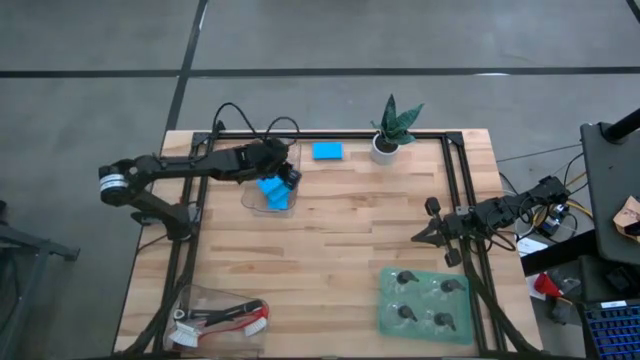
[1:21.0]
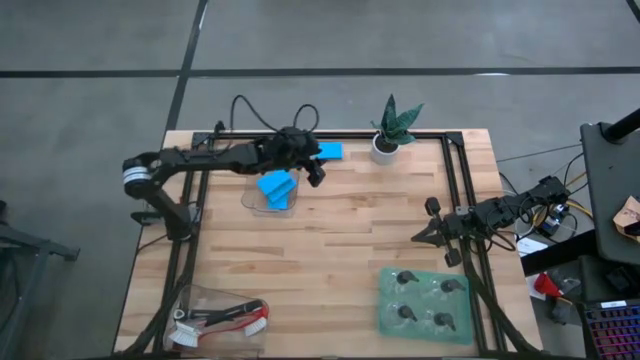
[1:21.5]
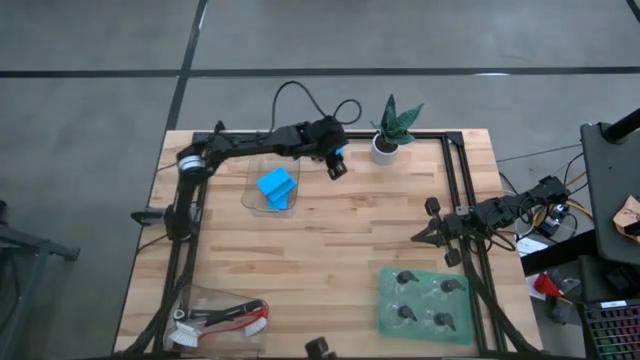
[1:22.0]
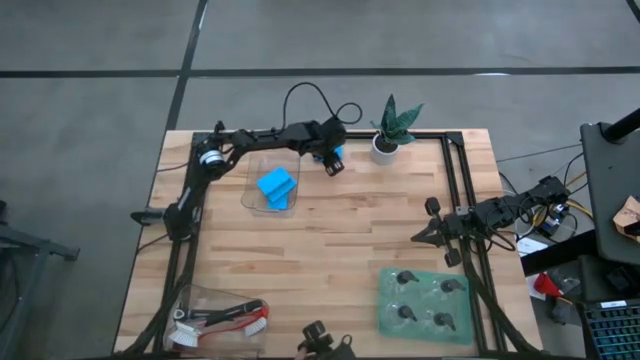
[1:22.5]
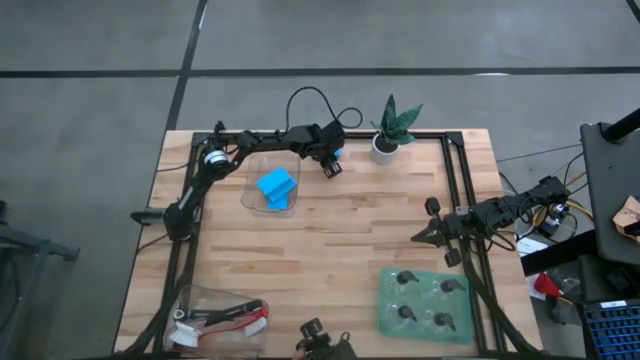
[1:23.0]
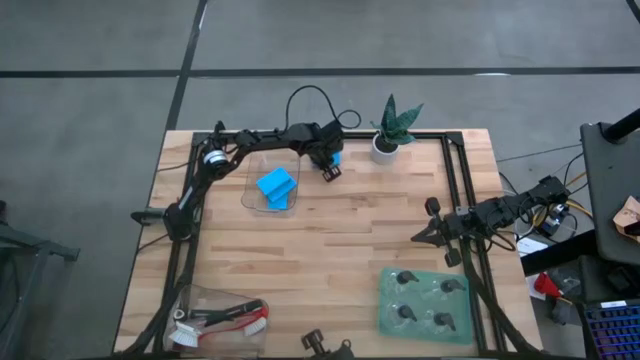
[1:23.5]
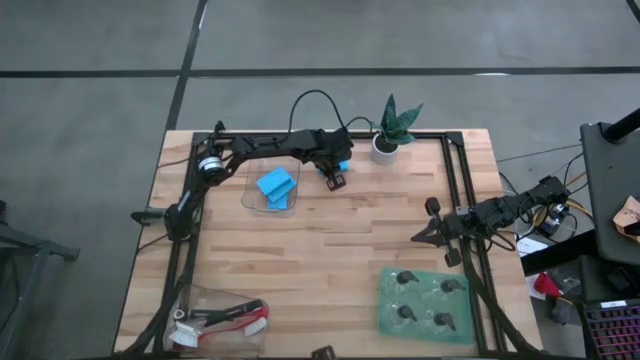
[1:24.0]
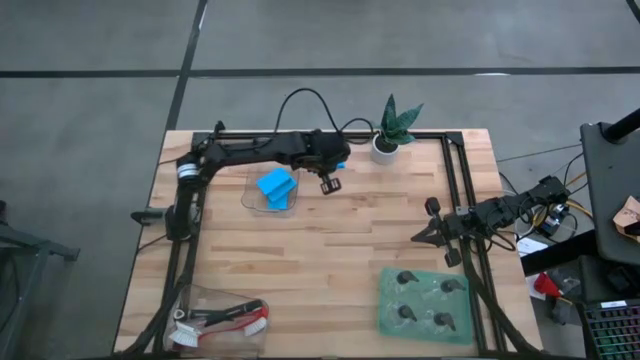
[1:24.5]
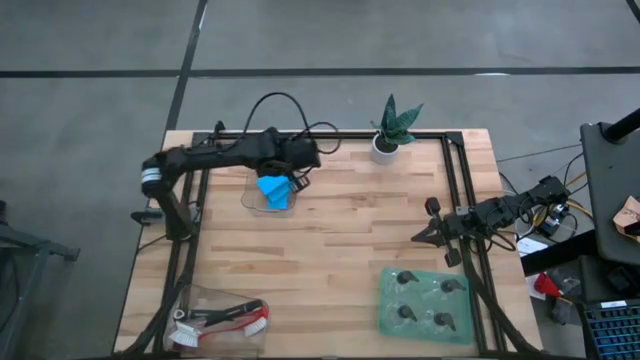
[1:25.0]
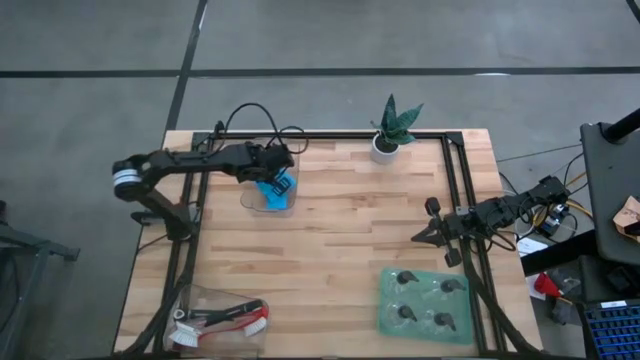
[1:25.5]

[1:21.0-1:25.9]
Task: Pick & Place Kitchen Sink Supplies
Put the sponge into the top transparent bin

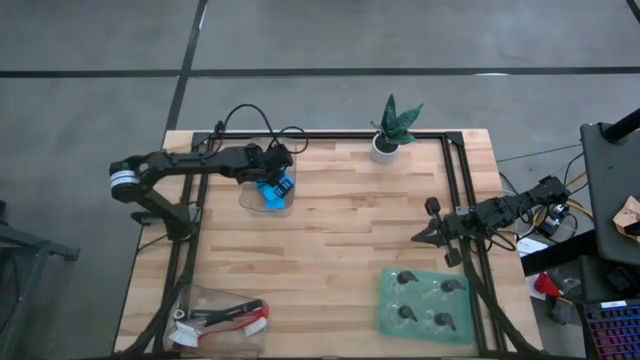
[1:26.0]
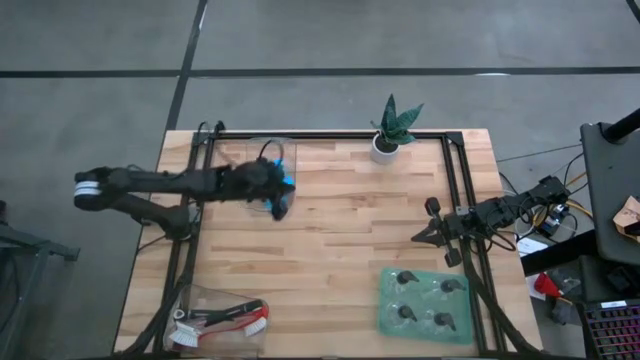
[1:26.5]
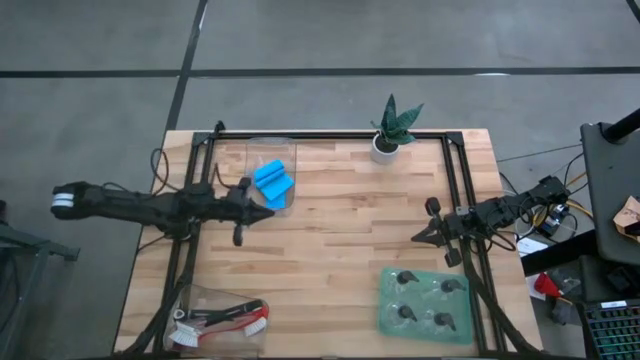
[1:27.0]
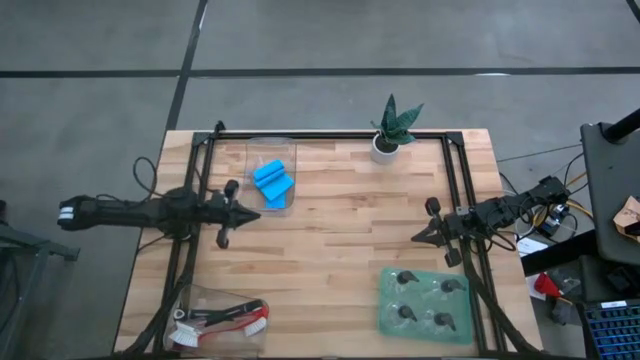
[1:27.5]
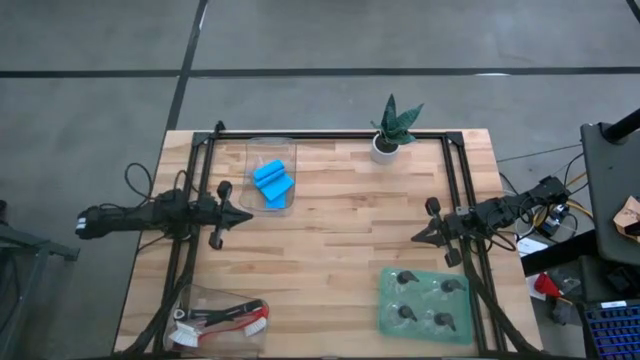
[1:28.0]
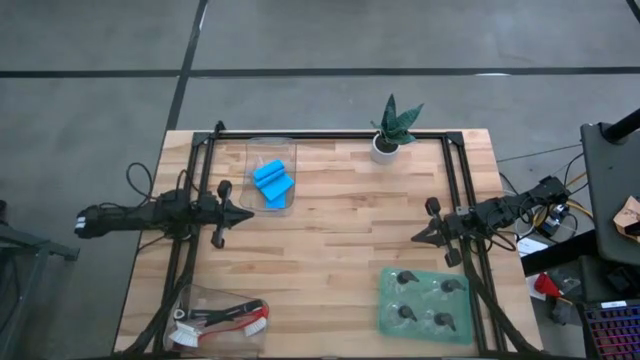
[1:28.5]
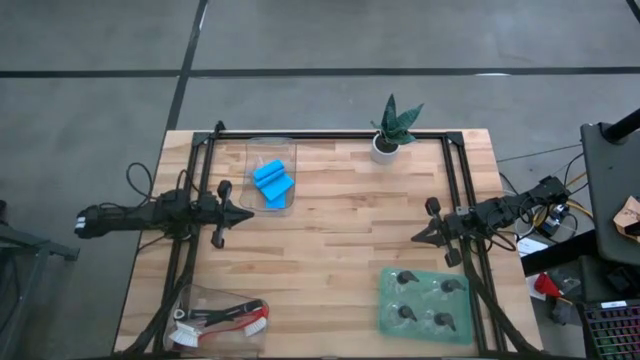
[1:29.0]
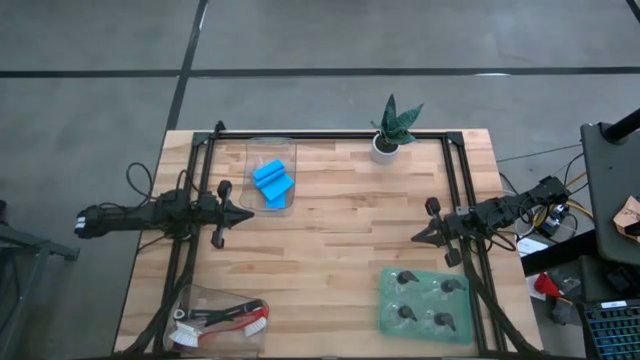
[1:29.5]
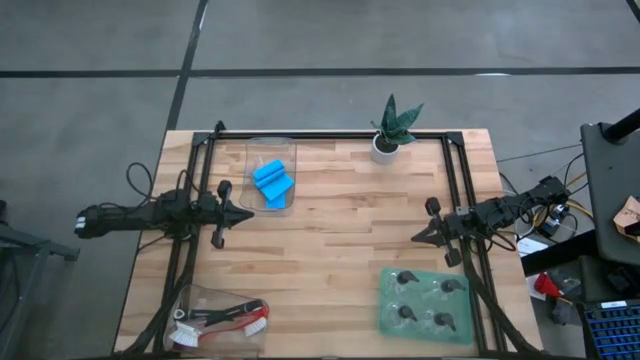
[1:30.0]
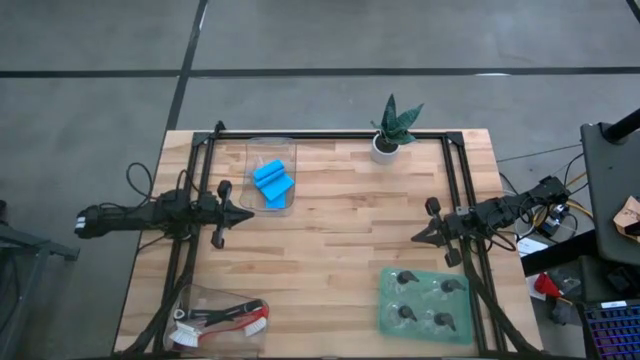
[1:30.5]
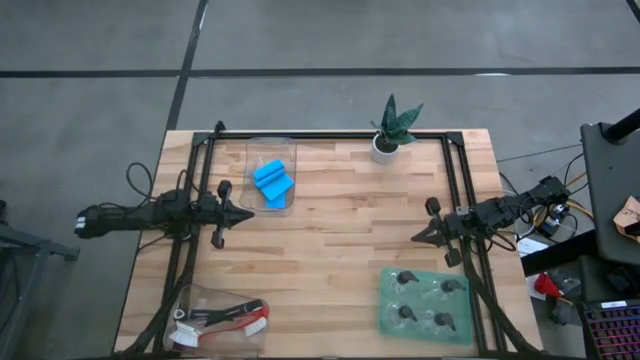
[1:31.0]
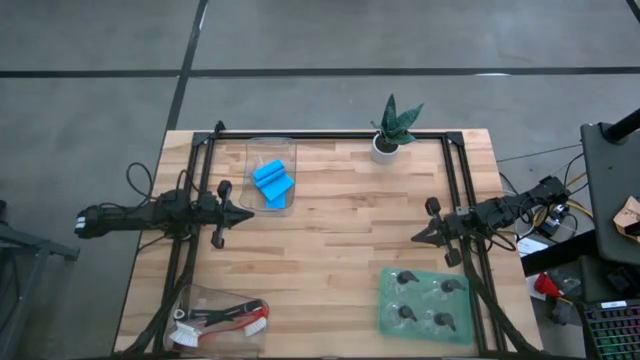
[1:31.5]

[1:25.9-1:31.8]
Return to Home Position

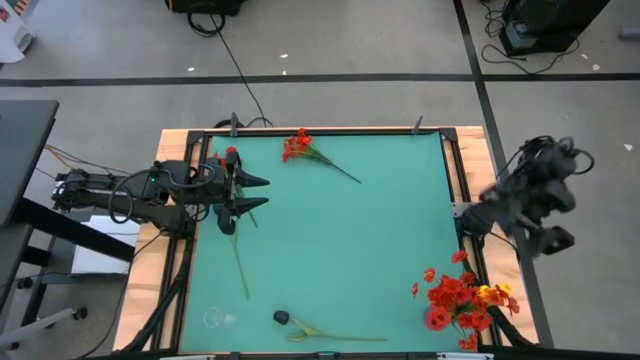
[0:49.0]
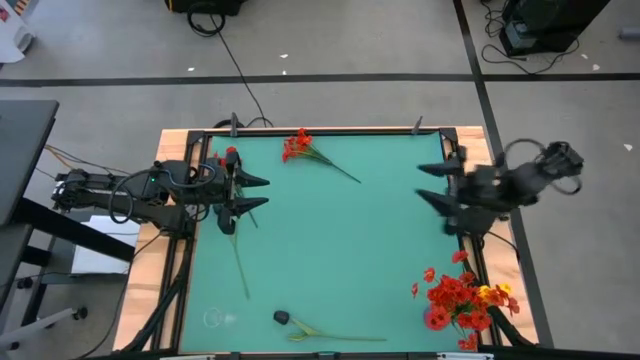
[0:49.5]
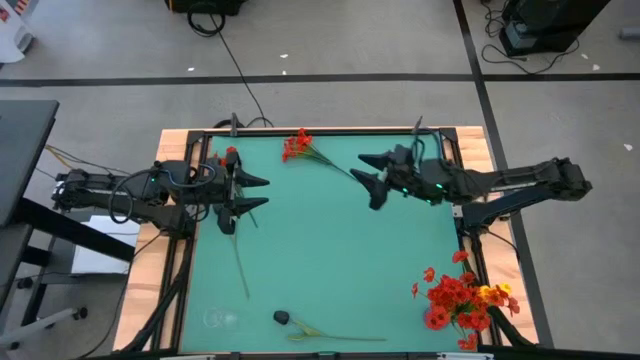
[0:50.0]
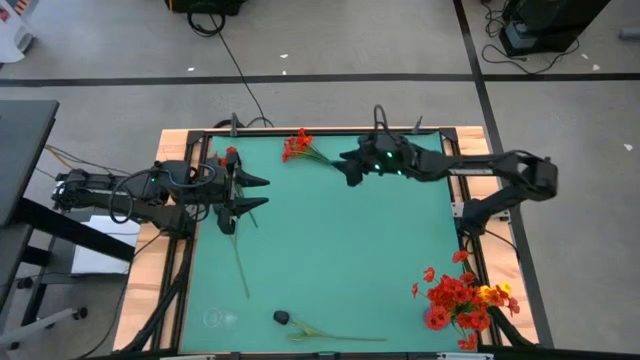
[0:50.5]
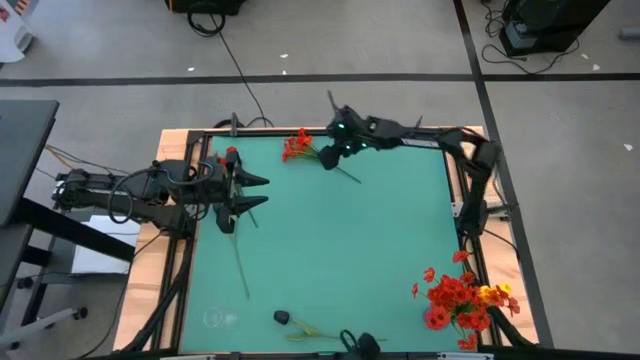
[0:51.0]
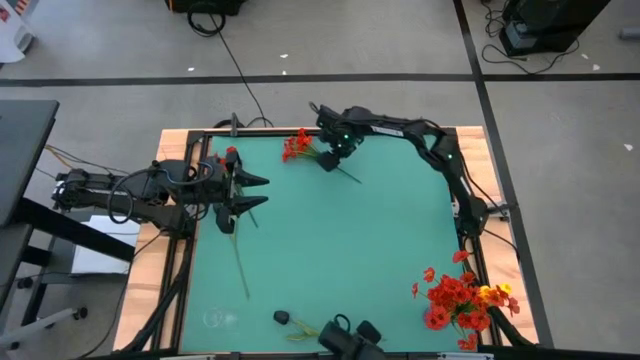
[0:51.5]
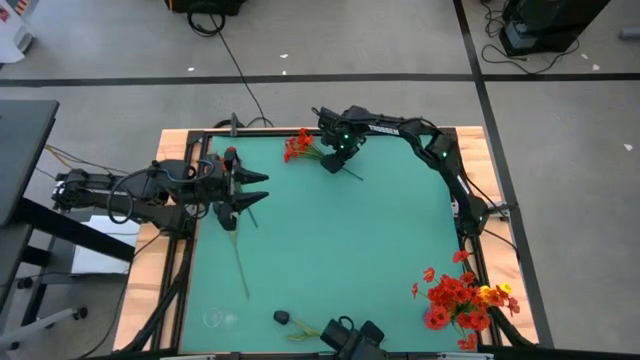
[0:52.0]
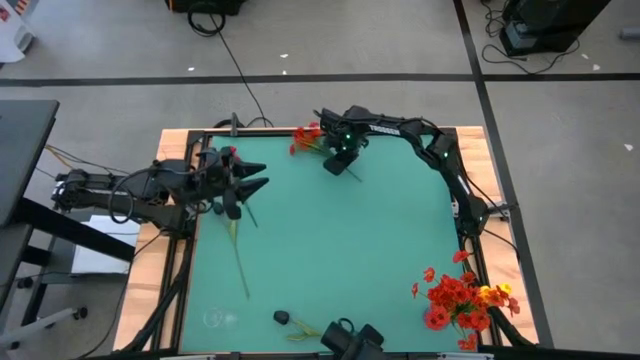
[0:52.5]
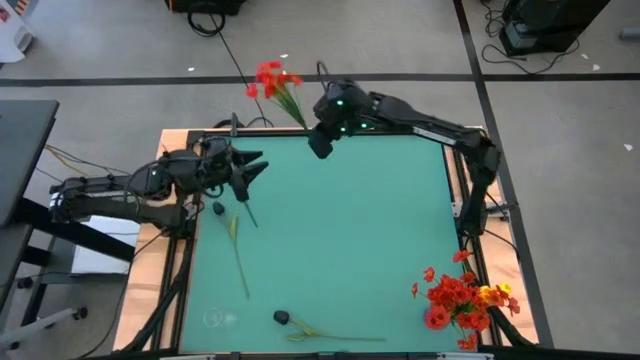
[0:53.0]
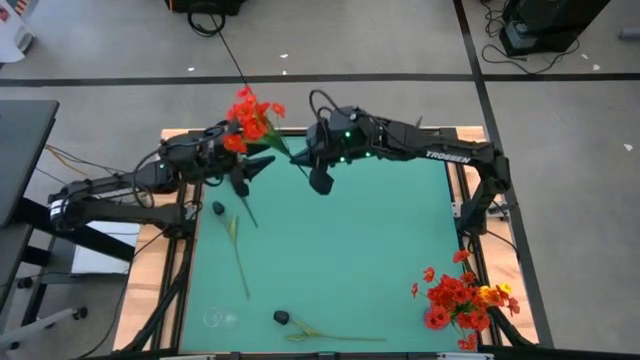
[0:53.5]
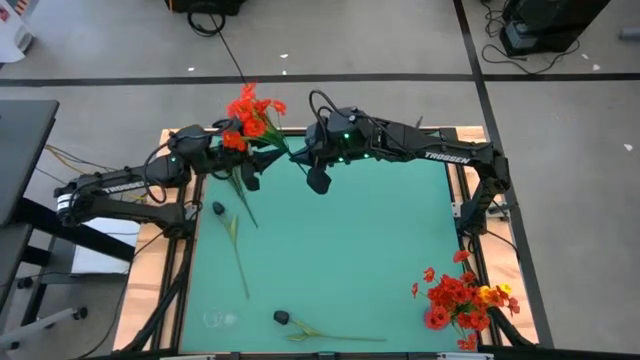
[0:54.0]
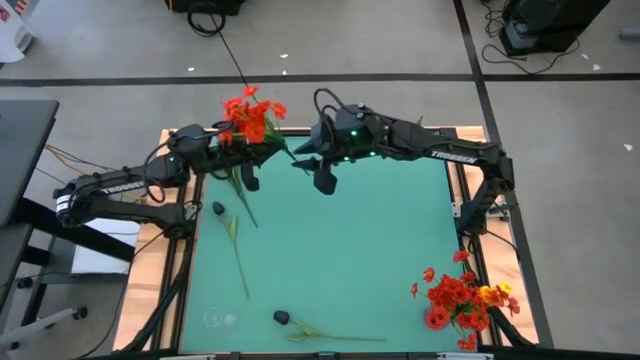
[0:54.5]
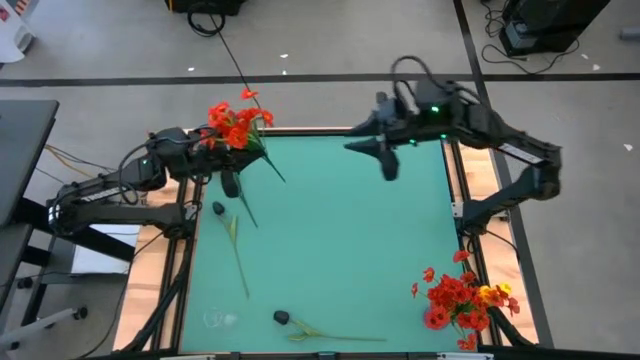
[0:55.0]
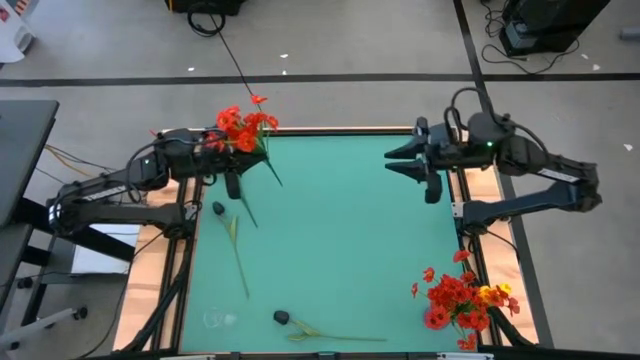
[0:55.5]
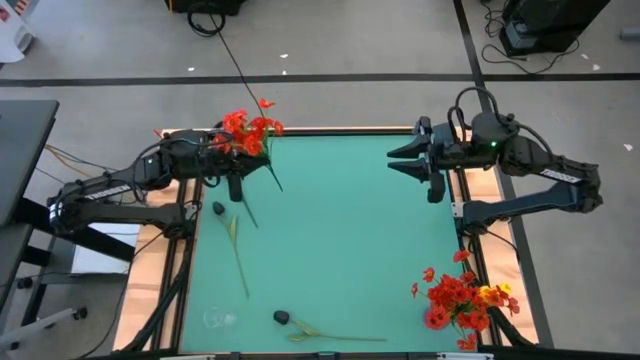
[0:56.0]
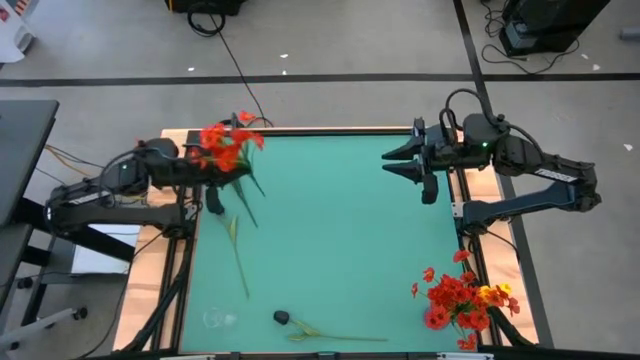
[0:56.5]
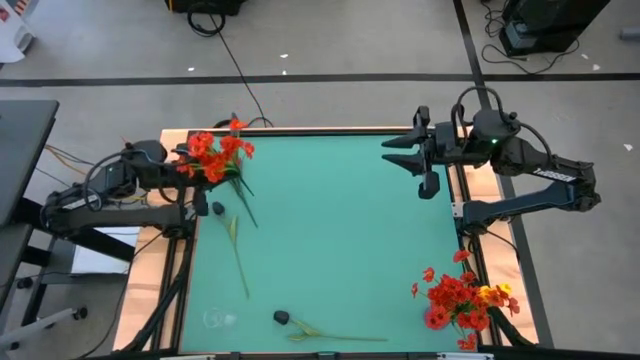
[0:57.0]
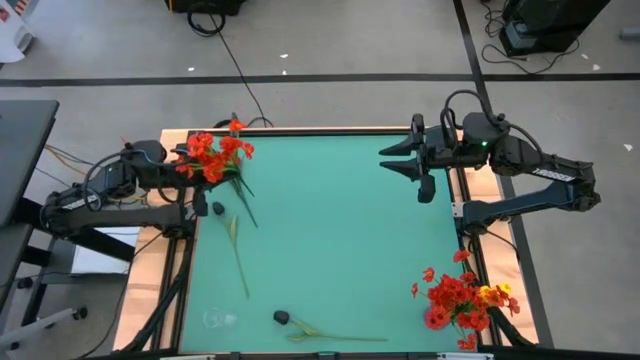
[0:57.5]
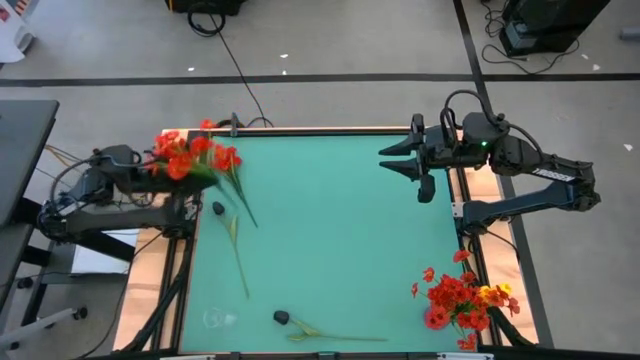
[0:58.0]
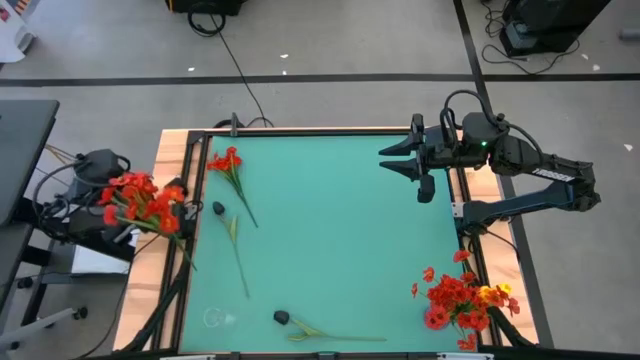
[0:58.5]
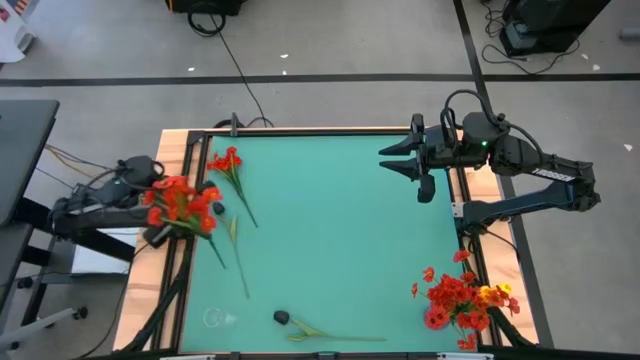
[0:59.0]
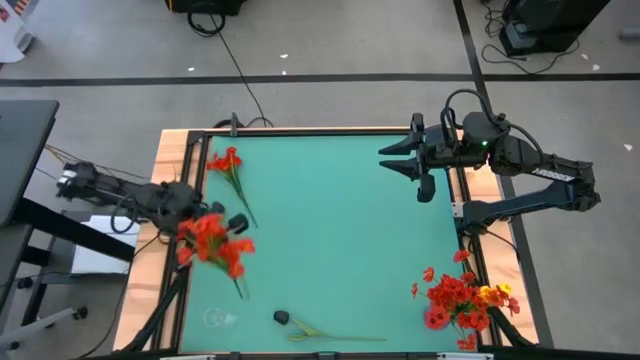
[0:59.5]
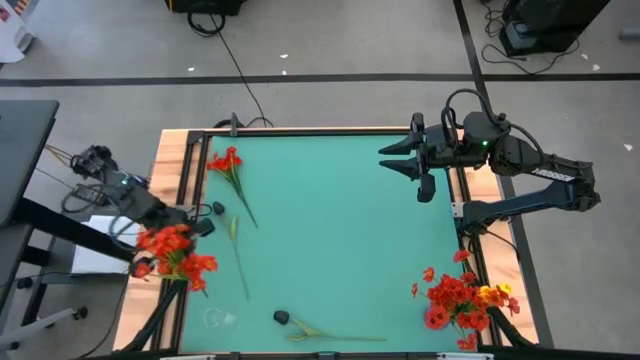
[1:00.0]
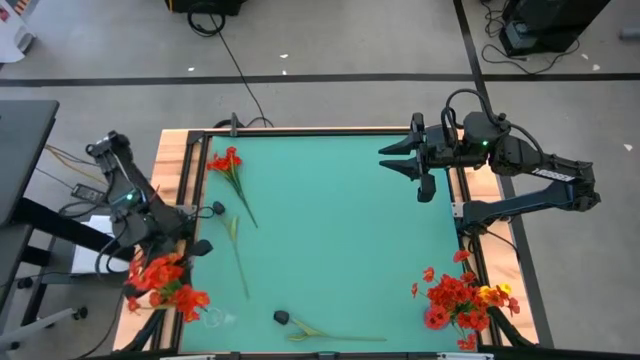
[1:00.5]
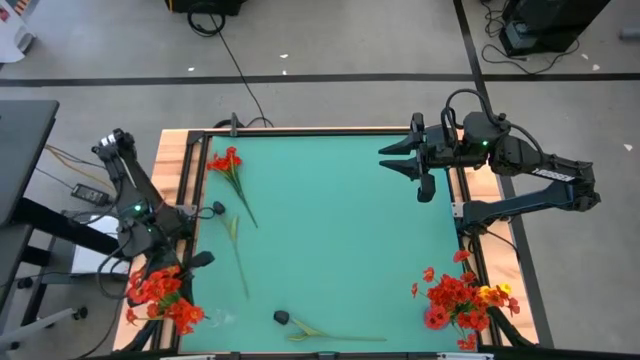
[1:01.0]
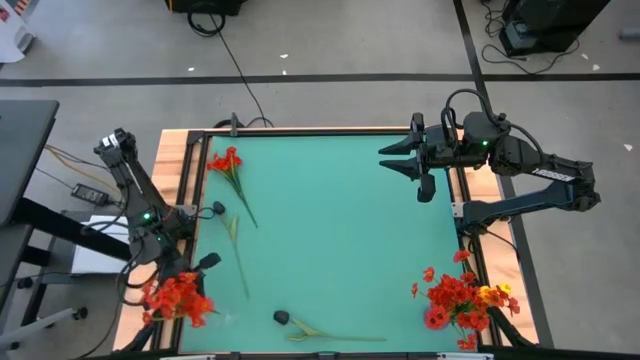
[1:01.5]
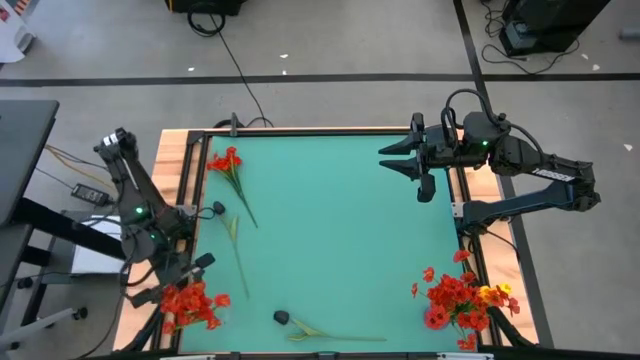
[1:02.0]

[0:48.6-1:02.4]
Task: Sort flowers into vase by color
Put the right orange flowers into the transparent vase
